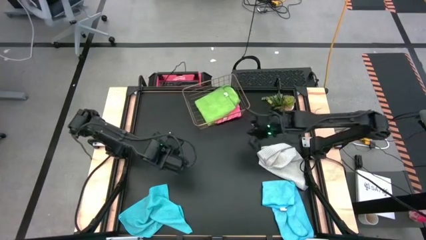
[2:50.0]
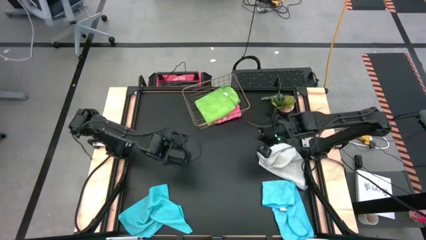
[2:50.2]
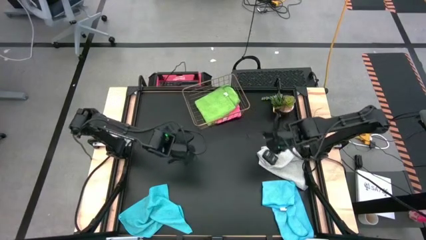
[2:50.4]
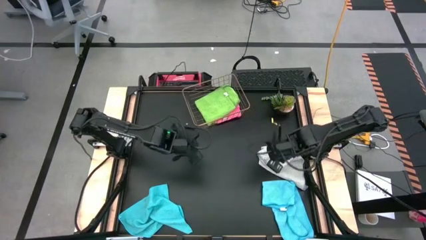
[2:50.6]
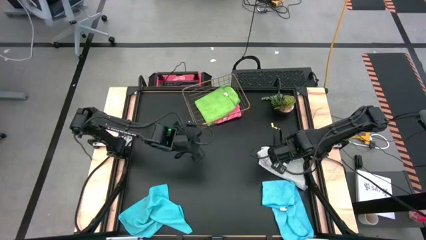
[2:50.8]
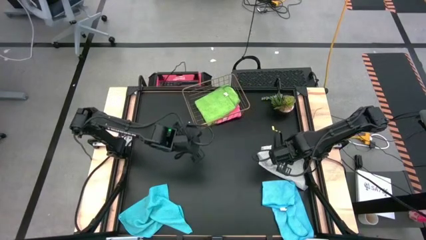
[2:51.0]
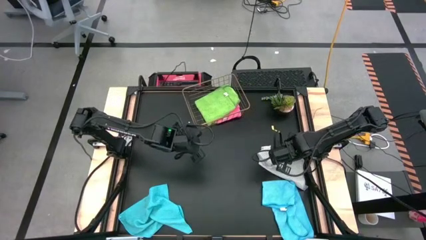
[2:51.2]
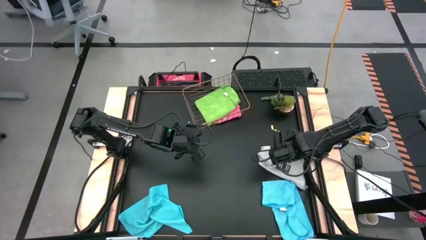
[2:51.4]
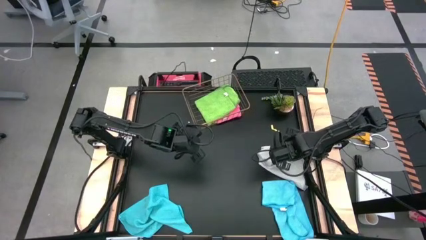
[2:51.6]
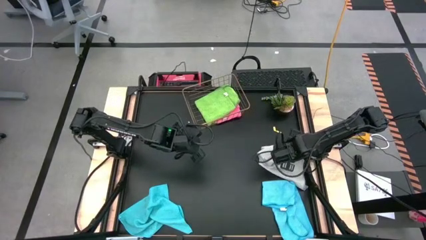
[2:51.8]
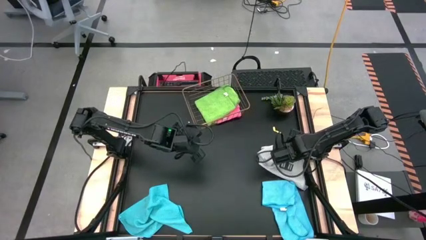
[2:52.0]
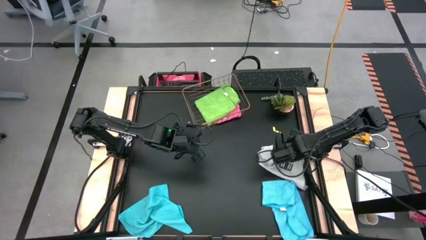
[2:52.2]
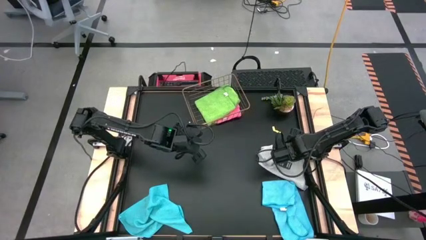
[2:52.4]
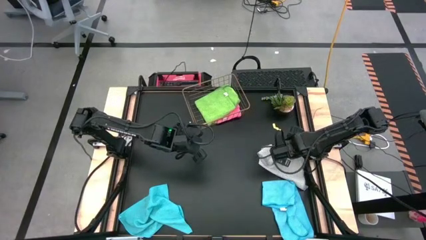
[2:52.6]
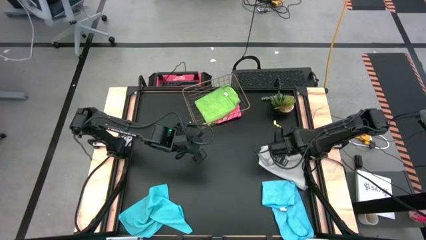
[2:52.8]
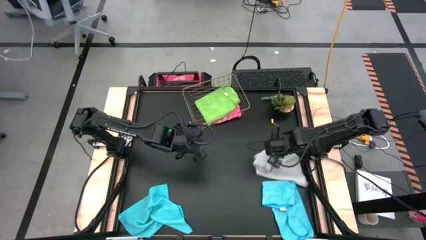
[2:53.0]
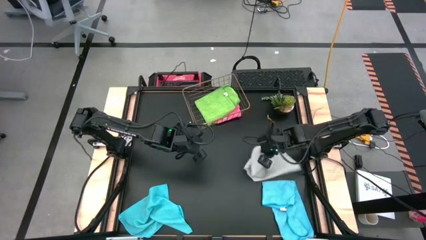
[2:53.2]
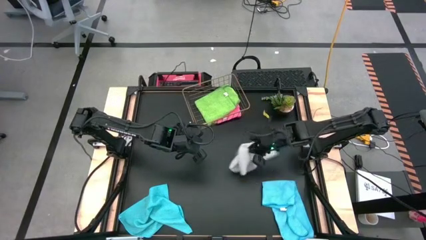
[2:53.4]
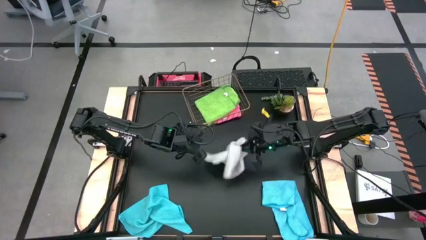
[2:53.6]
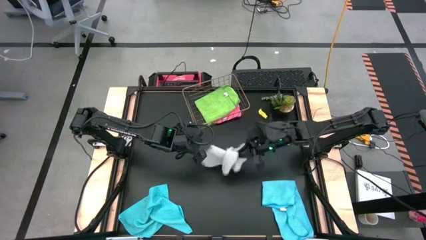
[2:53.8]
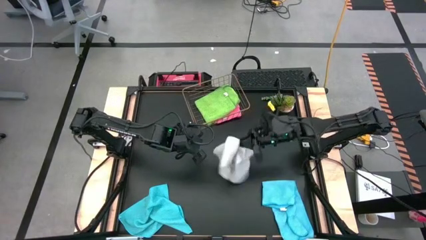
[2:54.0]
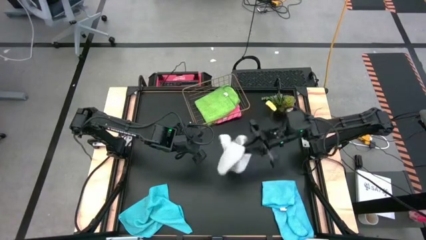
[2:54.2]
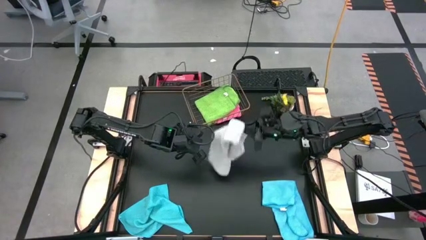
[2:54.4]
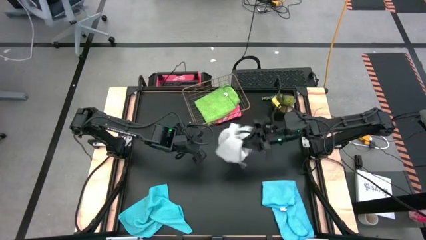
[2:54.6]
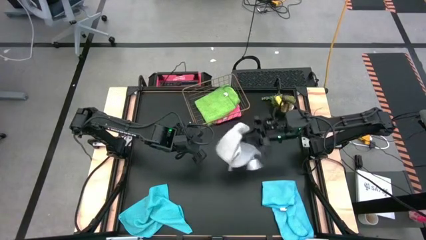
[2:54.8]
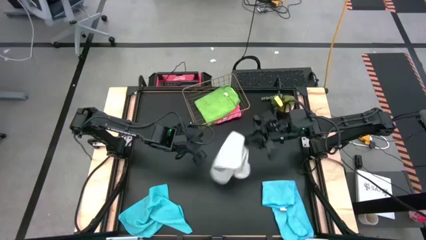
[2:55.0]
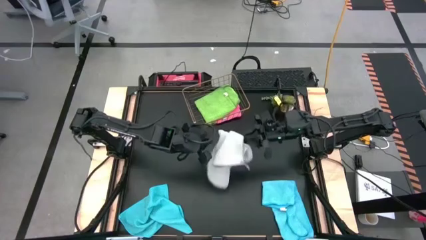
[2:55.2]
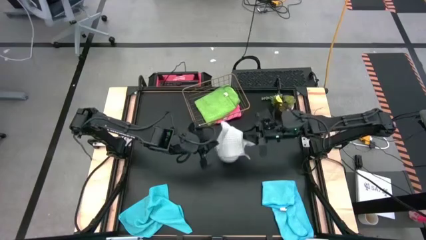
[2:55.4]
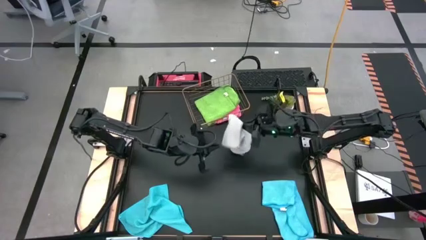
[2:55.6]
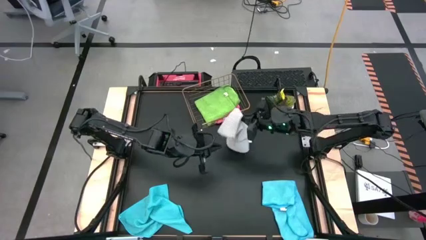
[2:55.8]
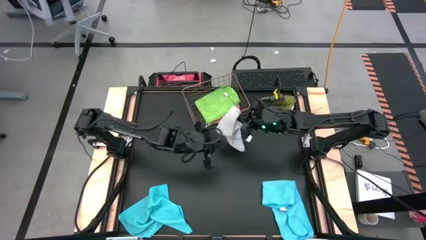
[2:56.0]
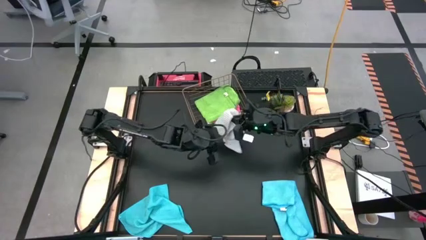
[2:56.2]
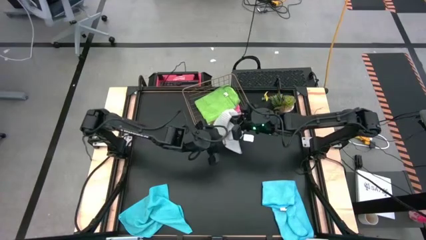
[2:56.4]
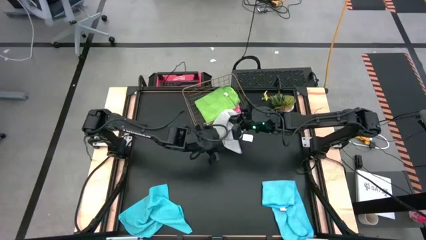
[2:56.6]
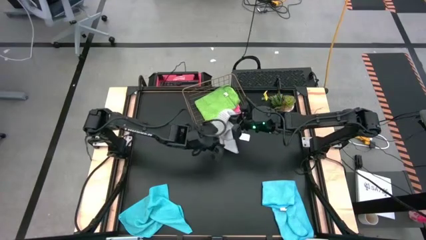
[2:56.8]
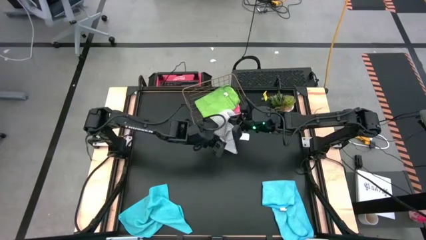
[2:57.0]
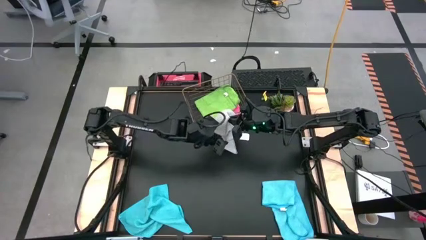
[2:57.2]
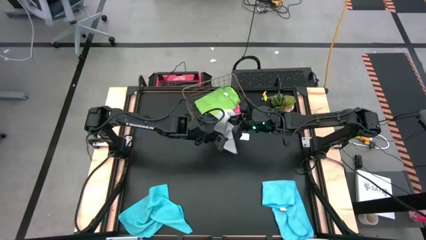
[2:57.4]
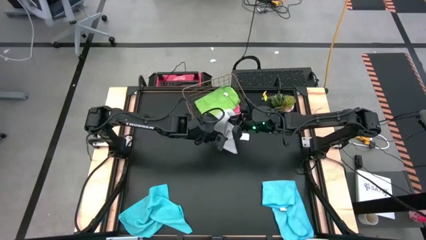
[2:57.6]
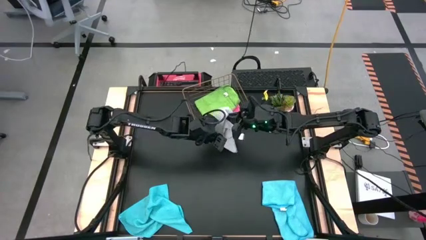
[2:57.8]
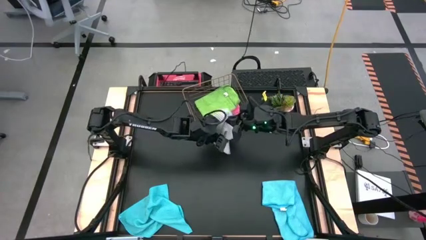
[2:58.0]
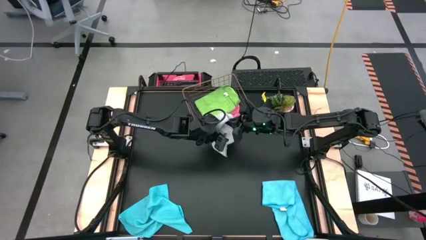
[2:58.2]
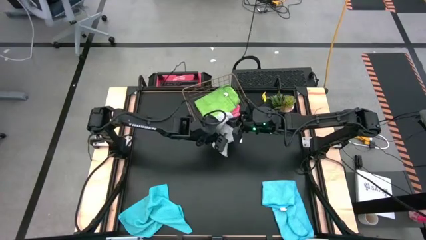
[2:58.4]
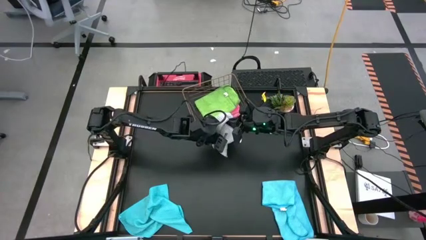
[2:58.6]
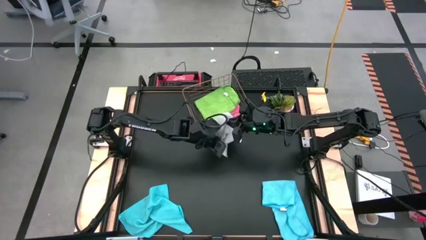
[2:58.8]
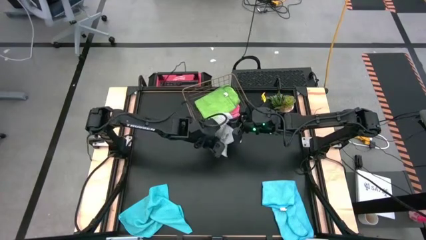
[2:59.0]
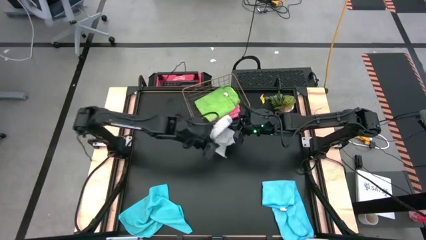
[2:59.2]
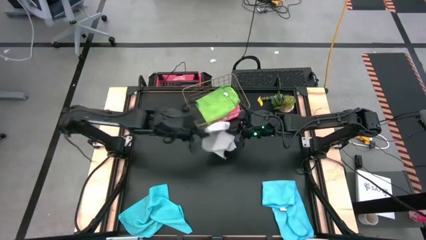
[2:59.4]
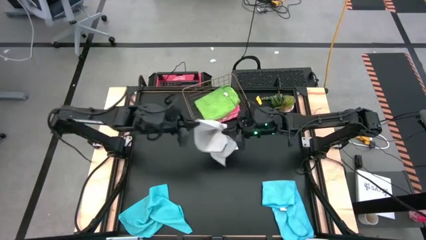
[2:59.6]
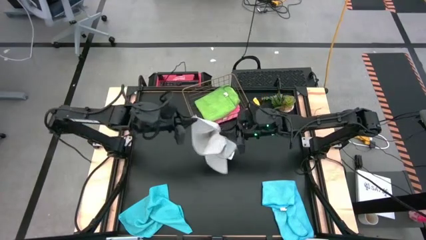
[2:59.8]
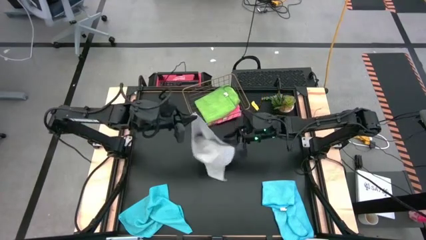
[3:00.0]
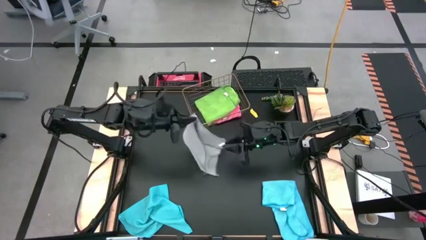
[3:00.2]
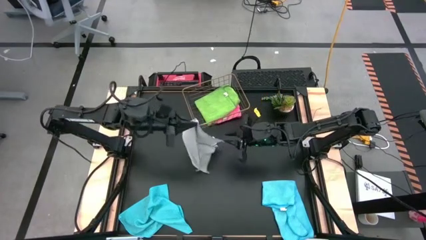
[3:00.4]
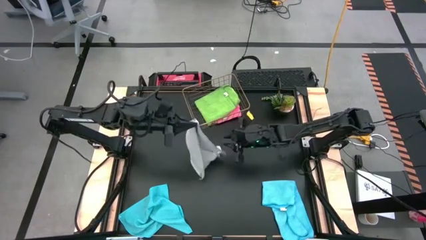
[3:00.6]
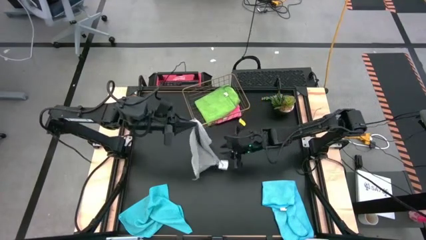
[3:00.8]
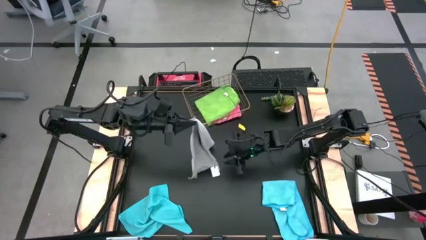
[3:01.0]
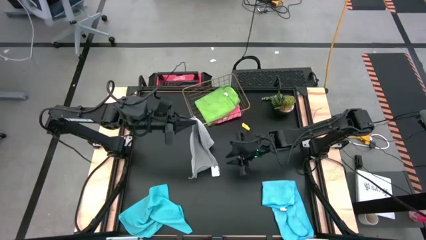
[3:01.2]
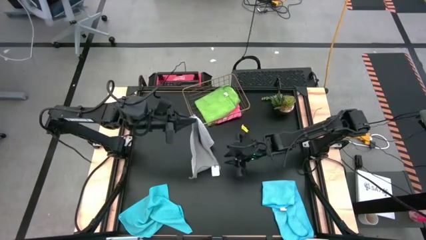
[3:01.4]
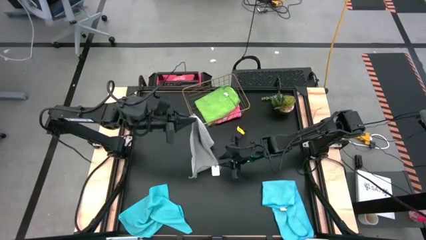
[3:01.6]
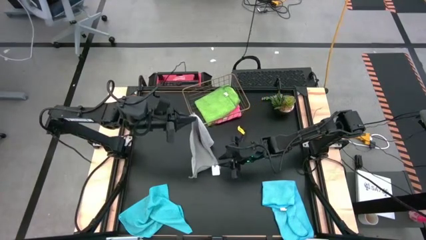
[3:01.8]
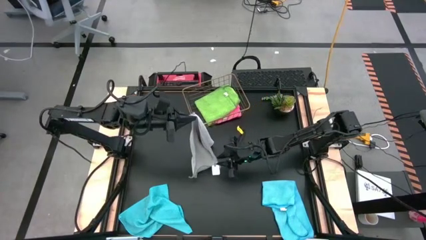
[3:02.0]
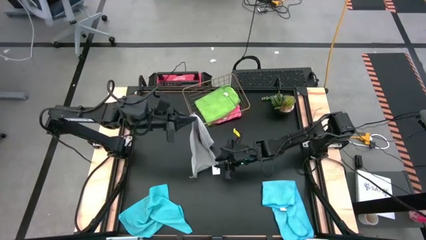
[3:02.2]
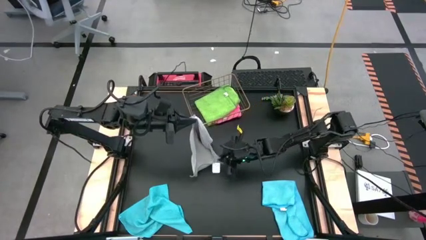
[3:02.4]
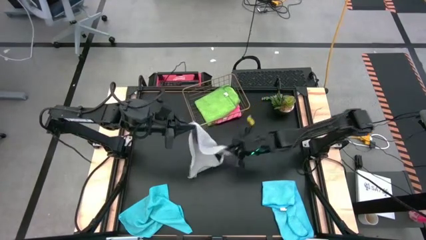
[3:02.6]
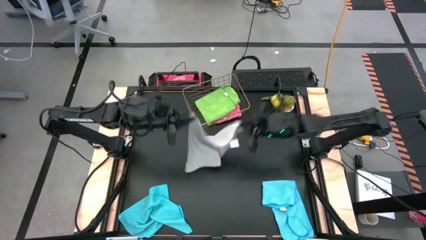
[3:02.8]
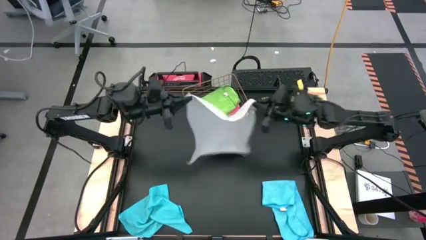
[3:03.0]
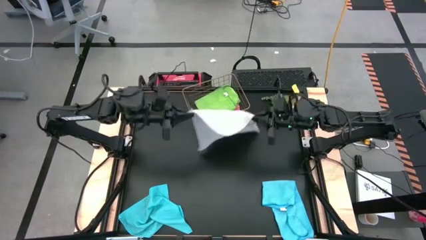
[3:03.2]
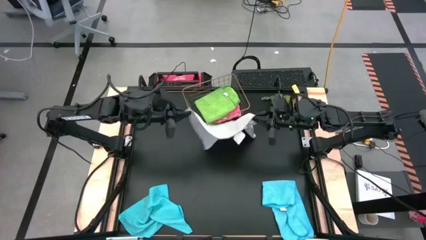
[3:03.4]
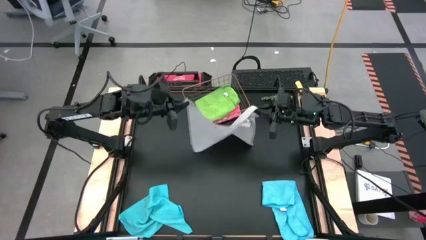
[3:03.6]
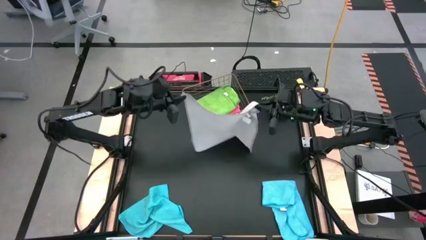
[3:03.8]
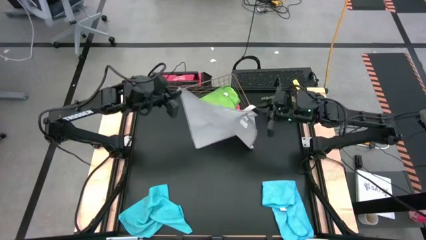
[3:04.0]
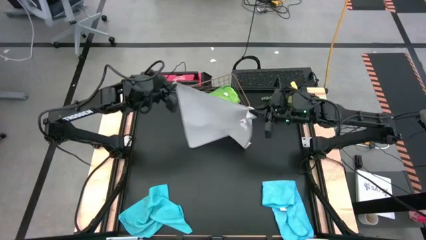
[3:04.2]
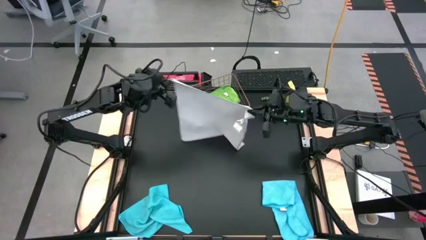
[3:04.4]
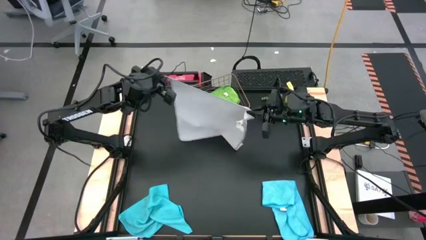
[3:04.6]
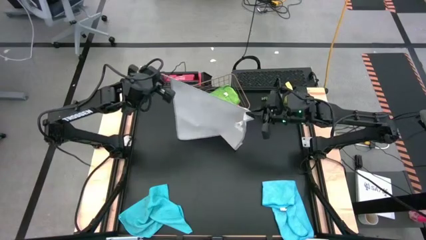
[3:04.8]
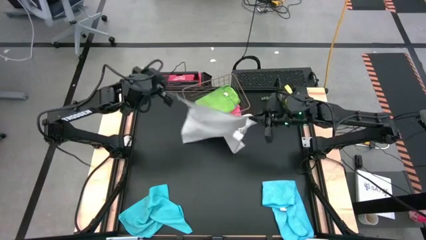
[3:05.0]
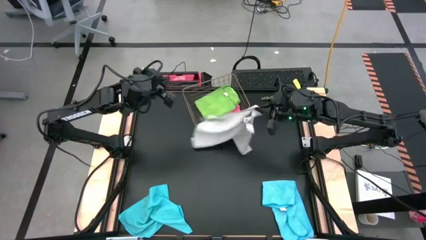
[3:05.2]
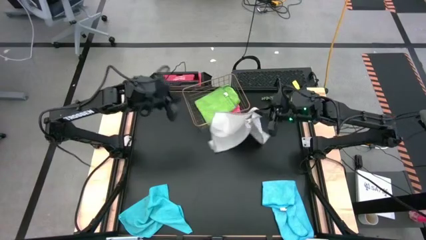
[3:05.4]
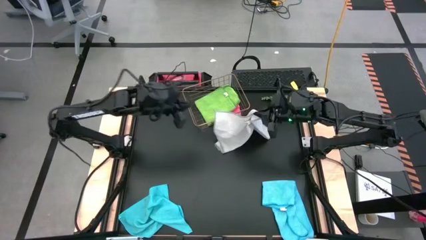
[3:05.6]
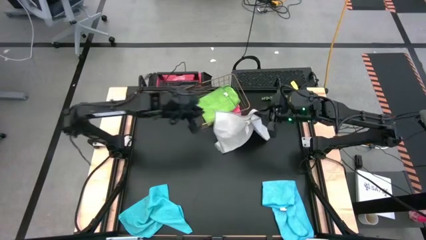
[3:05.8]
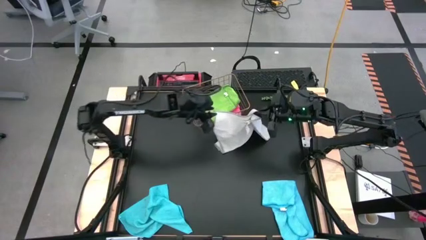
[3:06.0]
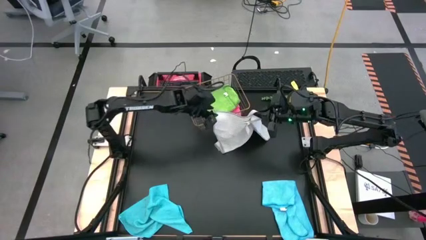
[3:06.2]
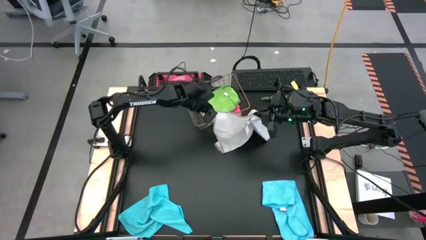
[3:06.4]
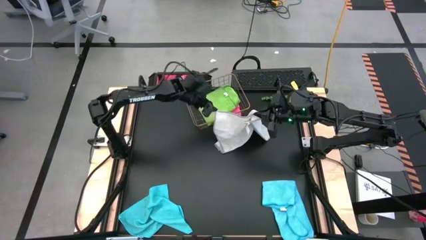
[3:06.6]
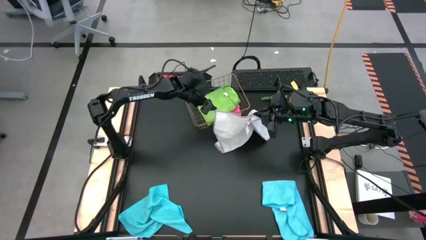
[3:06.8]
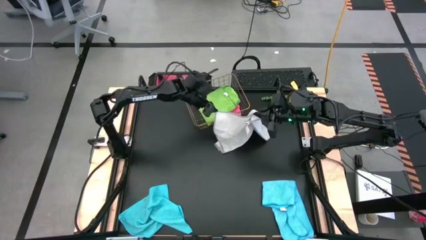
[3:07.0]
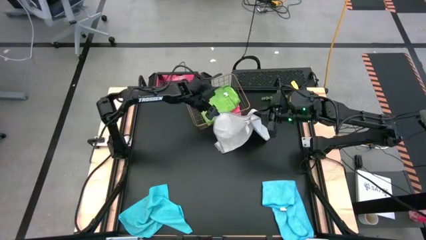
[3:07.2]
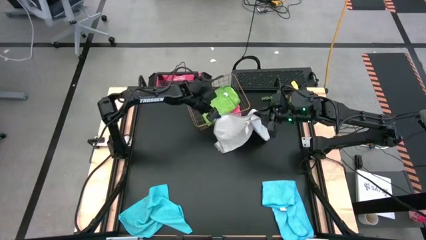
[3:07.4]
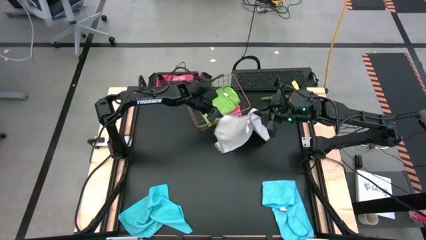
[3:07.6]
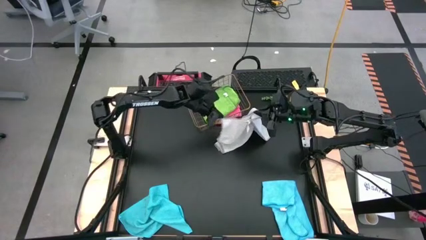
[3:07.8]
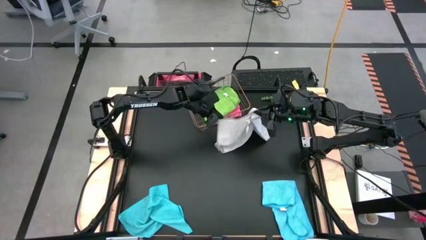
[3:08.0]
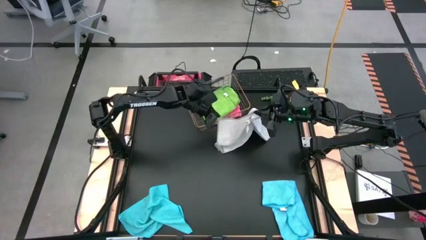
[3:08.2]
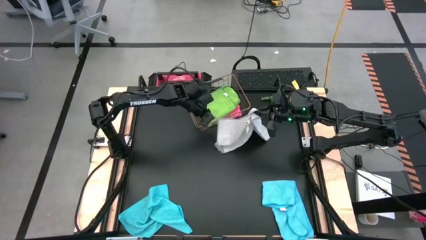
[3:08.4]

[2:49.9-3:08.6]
Task: Fold microfiber towels
Fold the gray microfiber cloth
